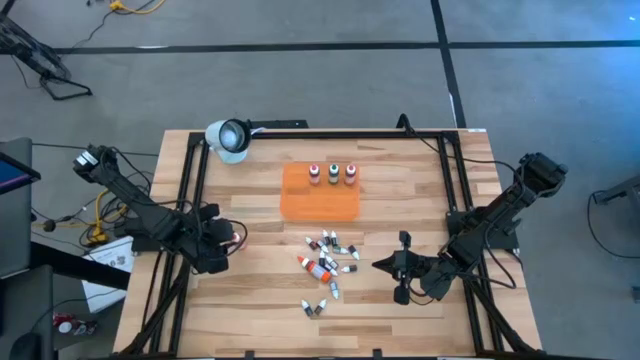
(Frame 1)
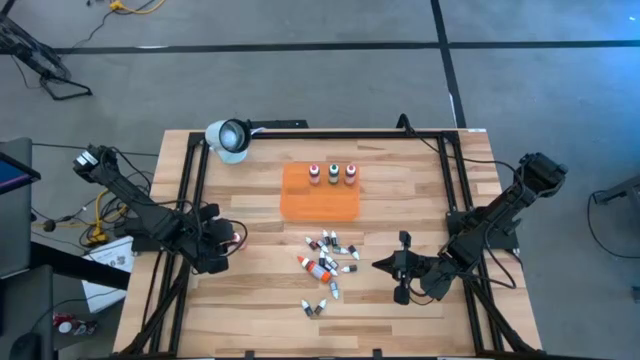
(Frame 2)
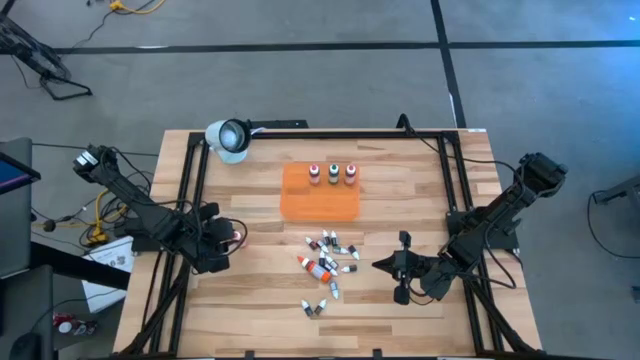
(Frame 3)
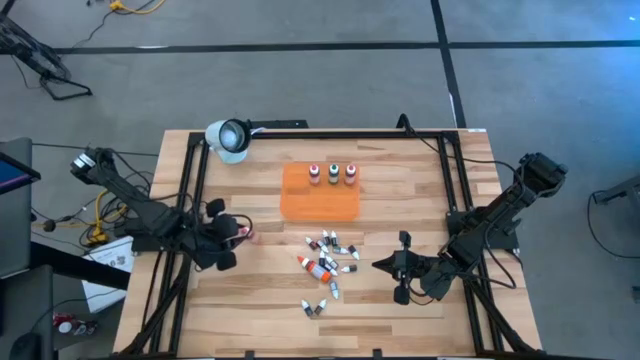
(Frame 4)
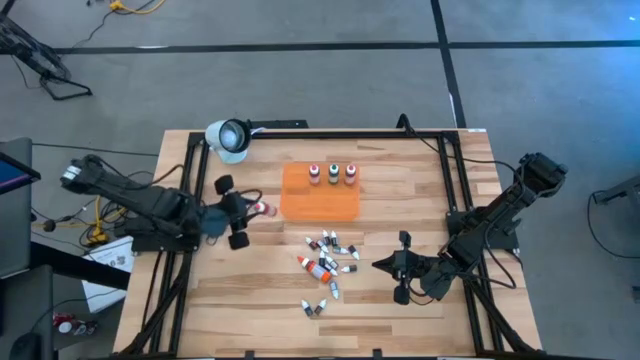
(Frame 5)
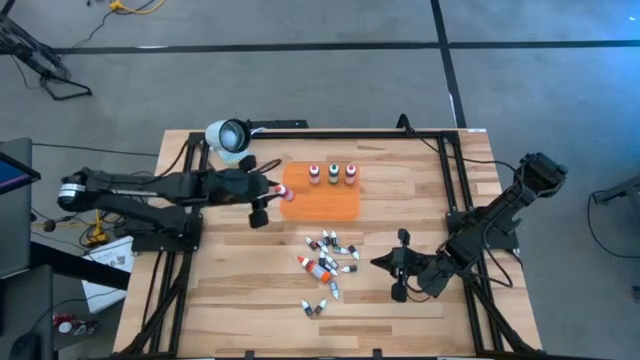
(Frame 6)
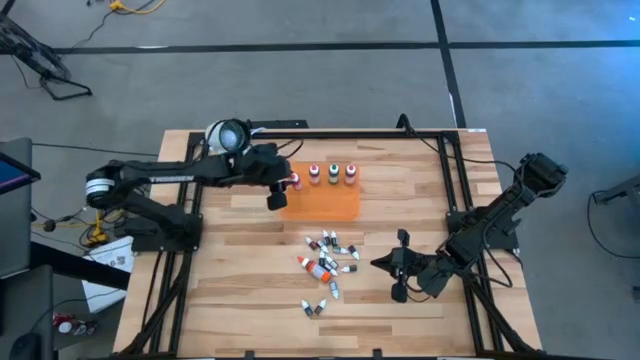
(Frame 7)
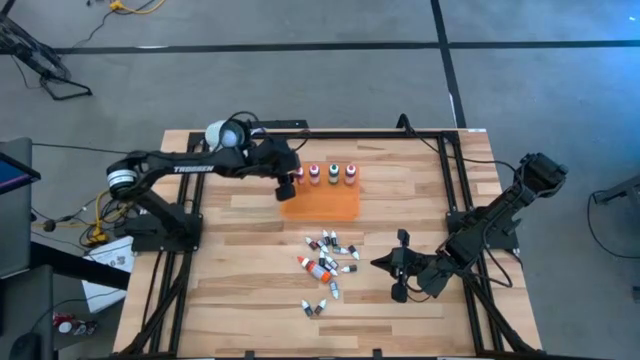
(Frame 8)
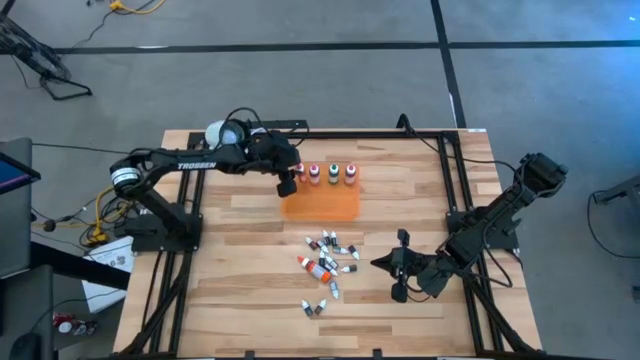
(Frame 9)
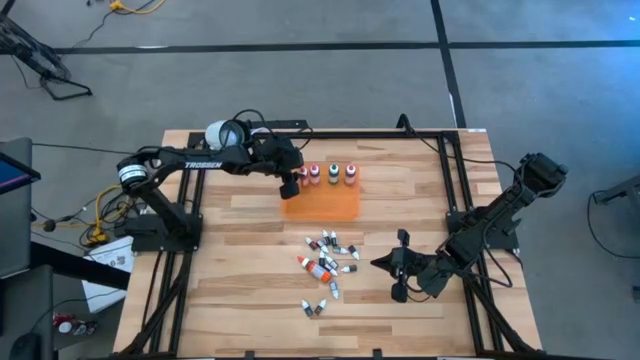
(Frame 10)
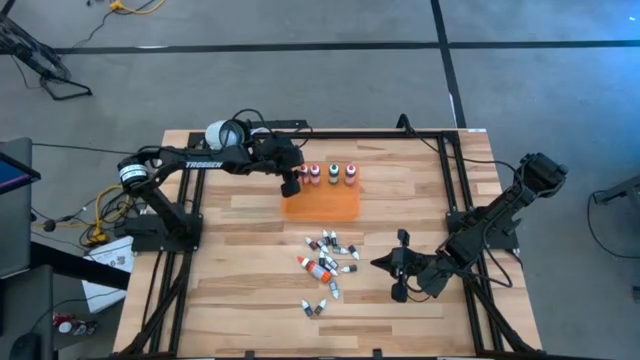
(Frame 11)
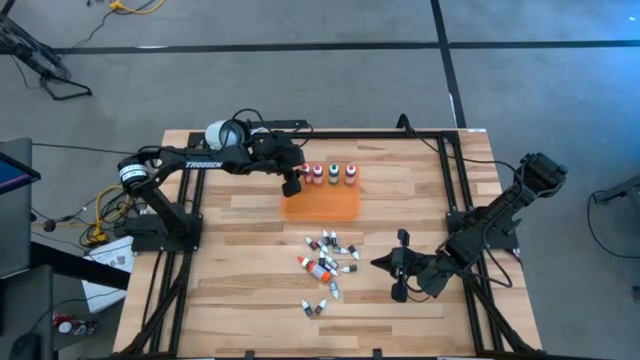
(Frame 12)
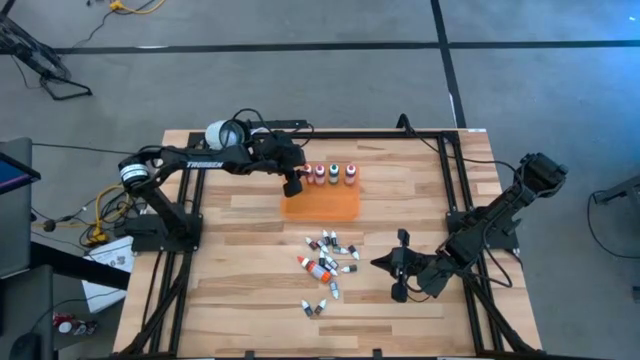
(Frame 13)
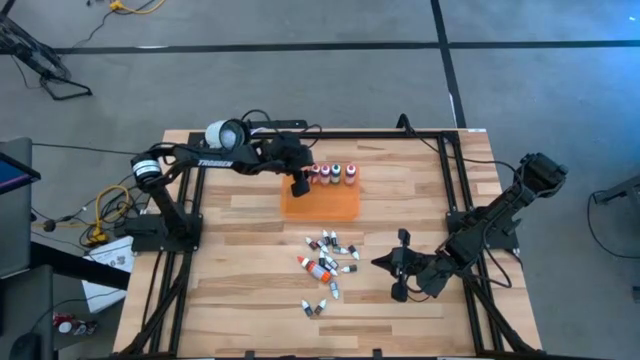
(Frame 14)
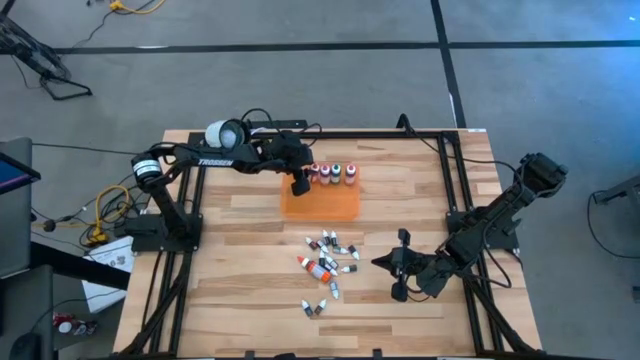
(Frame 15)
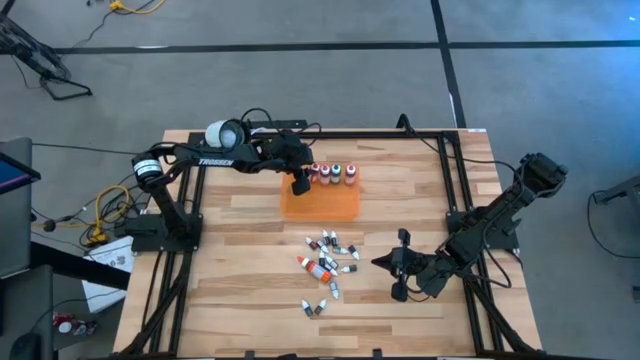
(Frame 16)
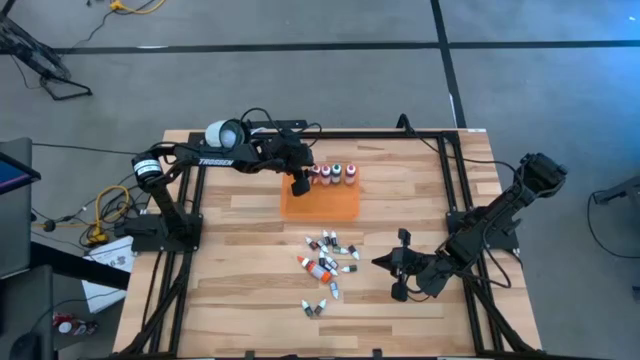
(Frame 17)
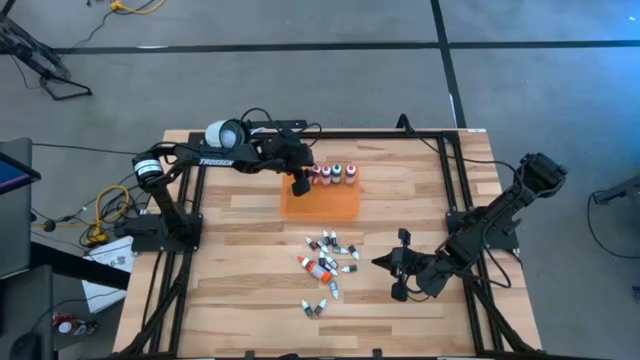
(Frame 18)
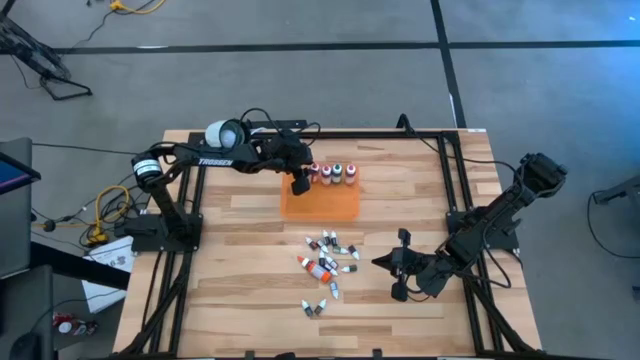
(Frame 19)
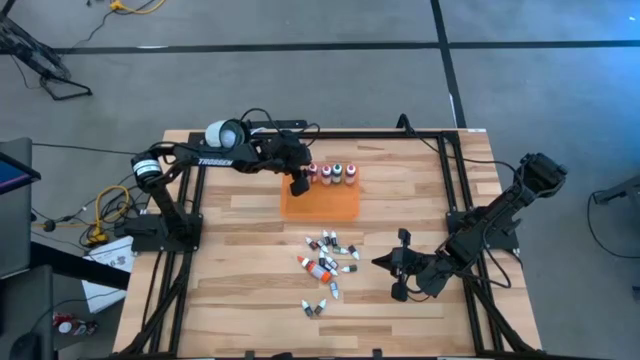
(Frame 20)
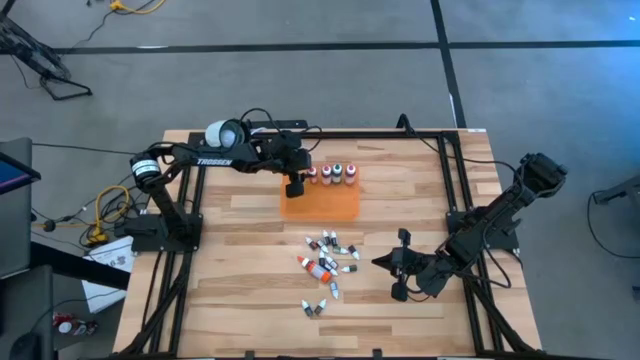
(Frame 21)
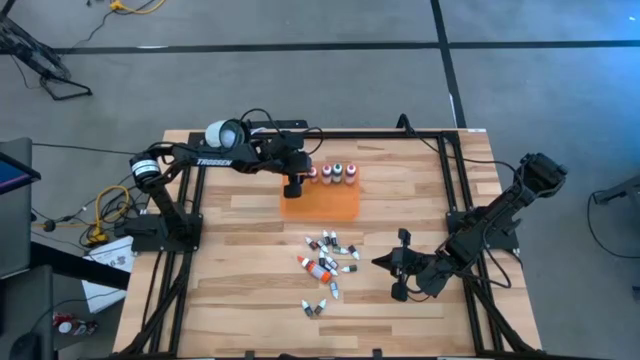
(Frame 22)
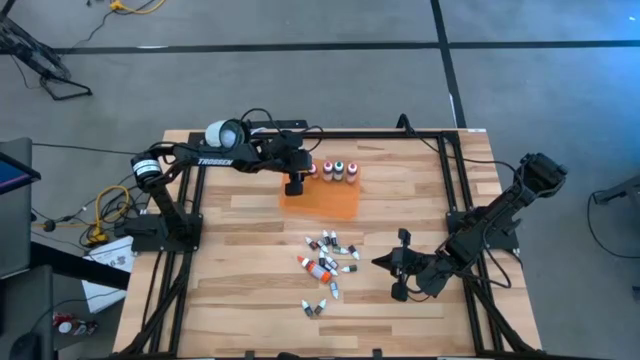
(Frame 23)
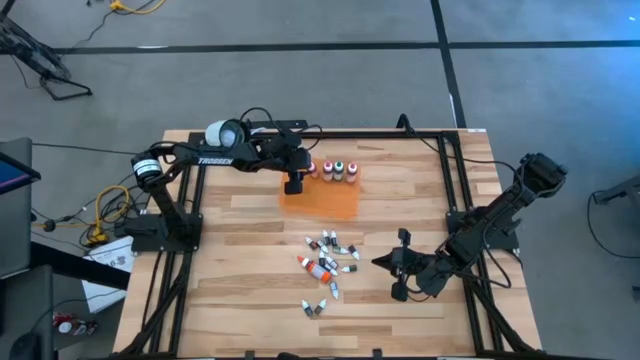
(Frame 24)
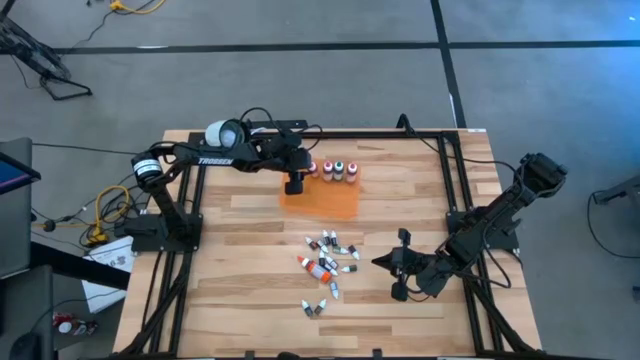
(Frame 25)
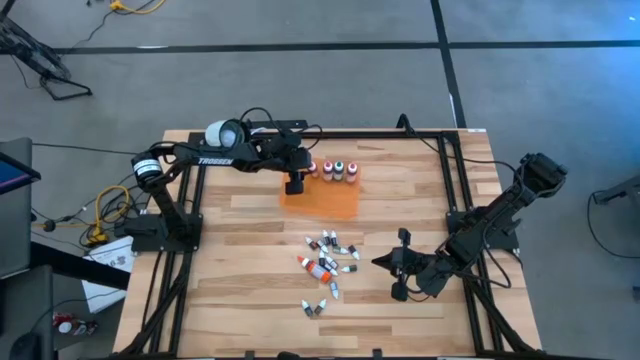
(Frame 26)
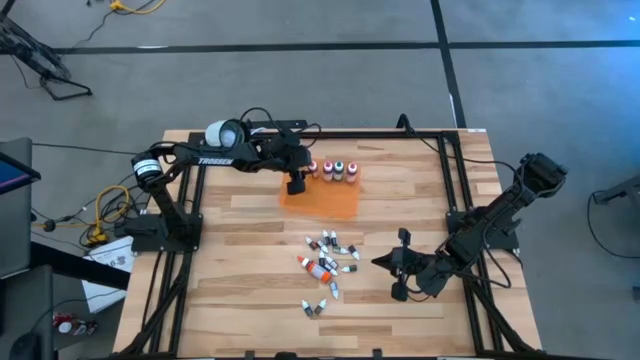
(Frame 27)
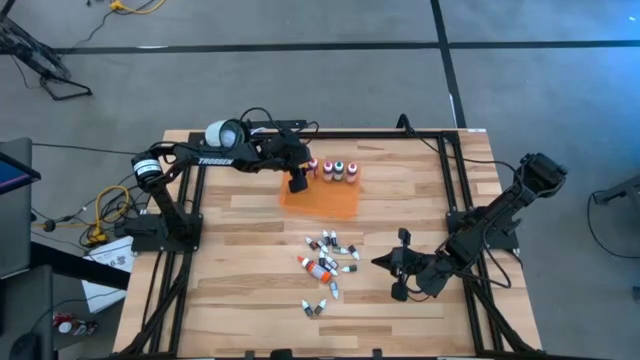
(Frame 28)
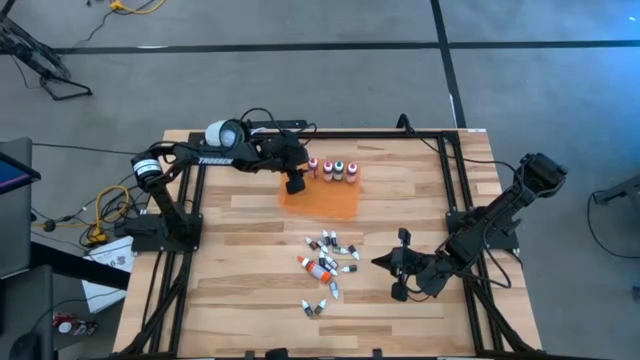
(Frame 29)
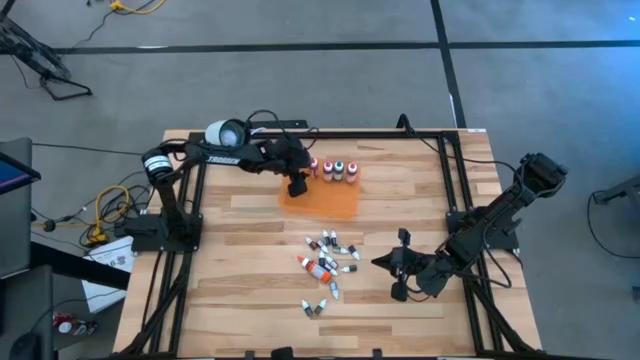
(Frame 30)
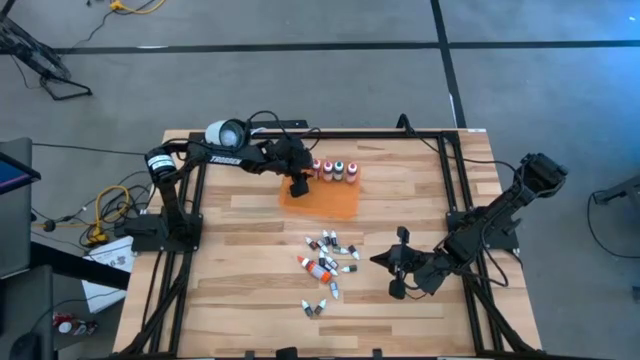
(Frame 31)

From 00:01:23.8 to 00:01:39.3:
Task: Pick & Place food coloring
Put the big orange food coloring bottle into the orange bin

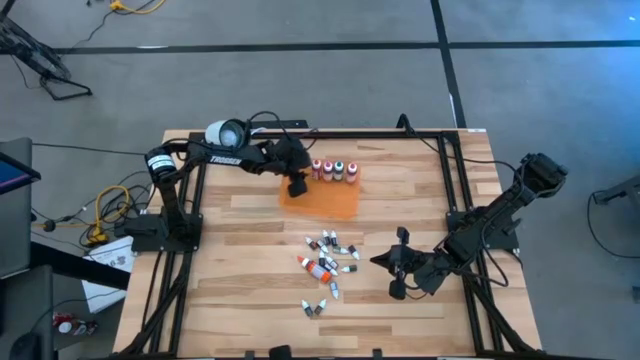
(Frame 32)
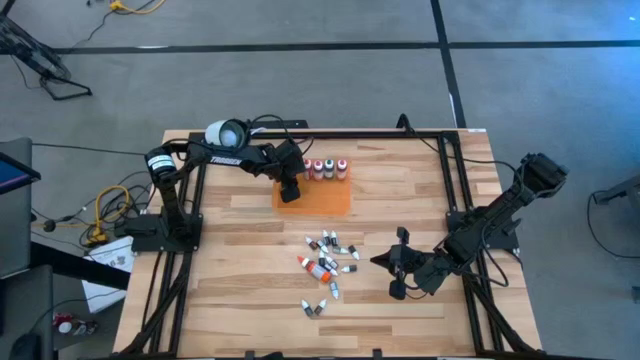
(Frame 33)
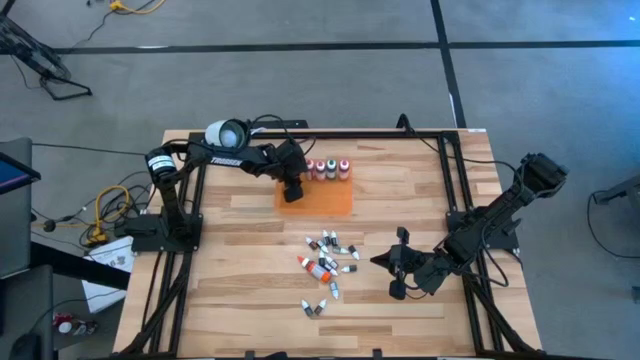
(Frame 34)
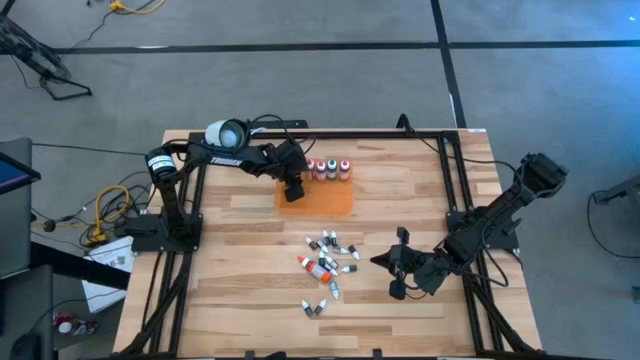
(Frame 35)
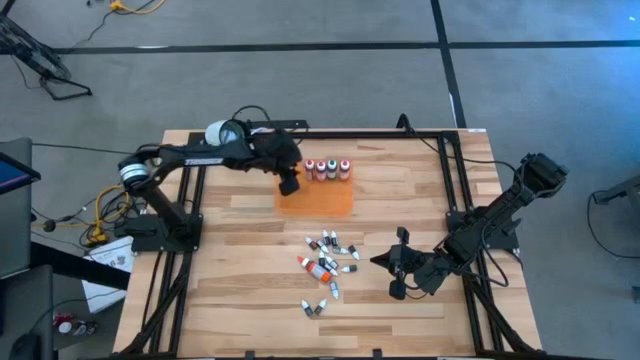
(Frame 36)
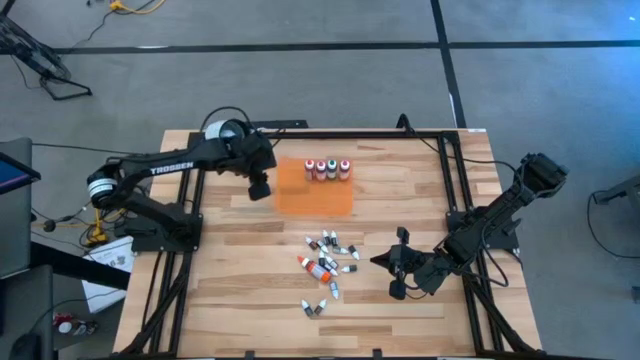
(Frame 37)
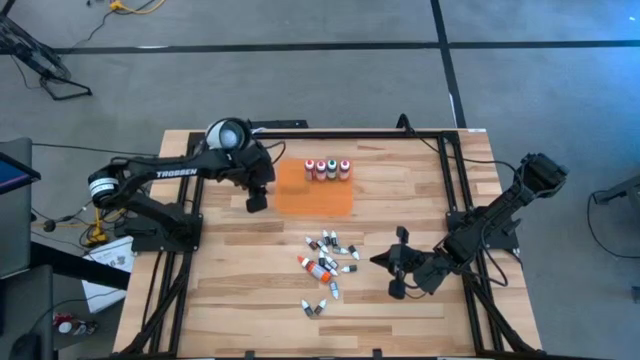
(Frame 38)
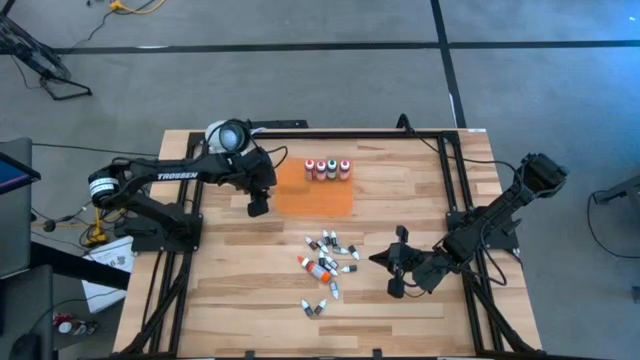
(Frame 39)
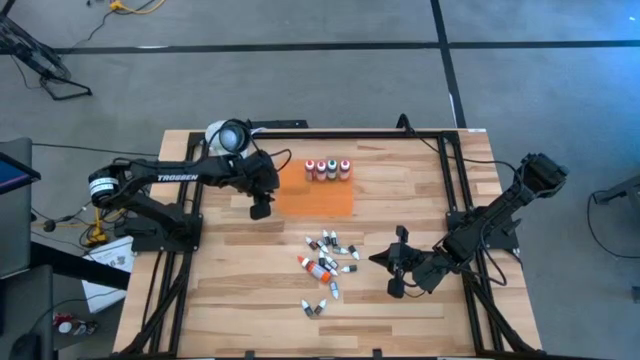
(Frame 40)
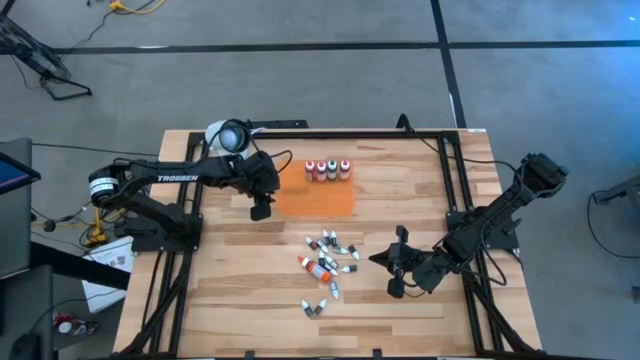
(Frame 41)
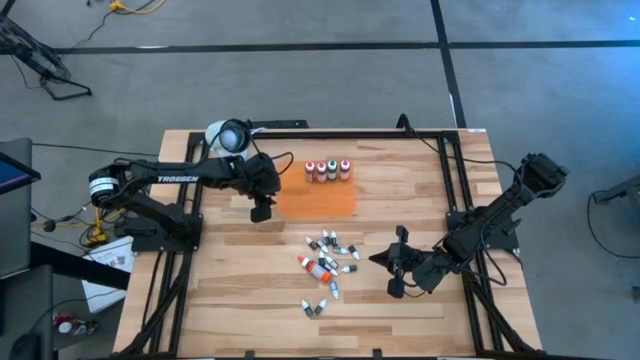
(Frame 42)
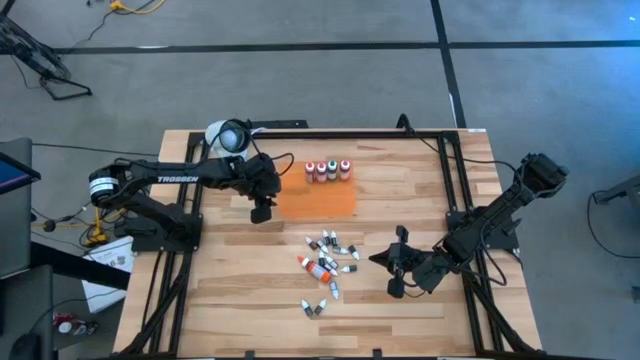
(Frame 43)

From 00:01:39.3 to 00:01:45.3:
Adjust the orange bin
